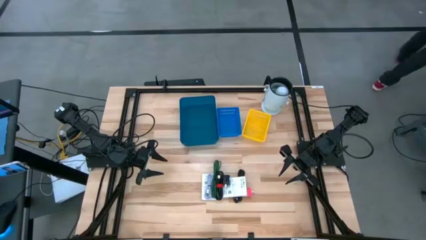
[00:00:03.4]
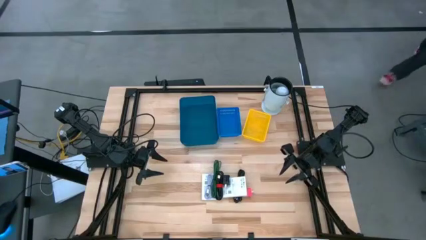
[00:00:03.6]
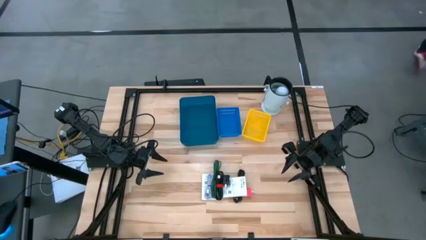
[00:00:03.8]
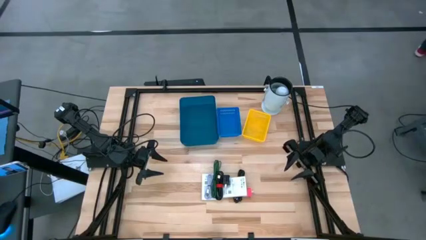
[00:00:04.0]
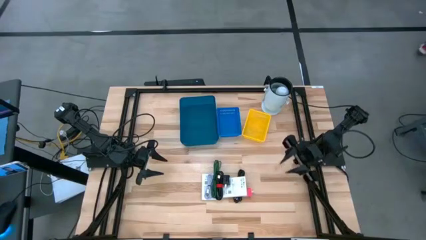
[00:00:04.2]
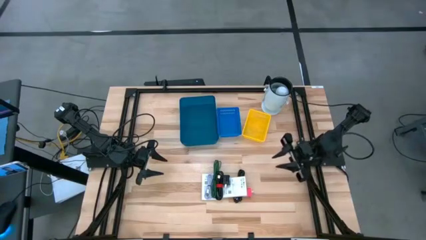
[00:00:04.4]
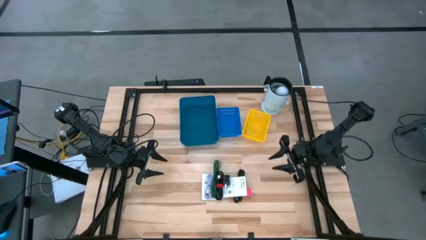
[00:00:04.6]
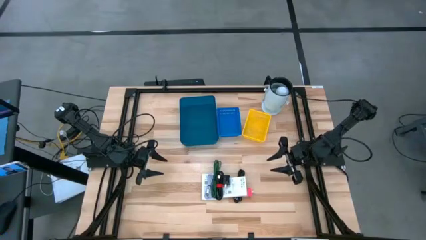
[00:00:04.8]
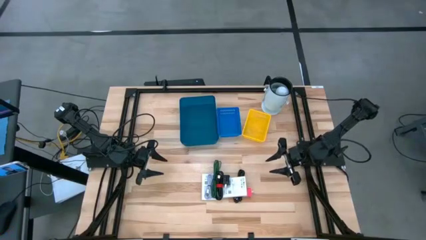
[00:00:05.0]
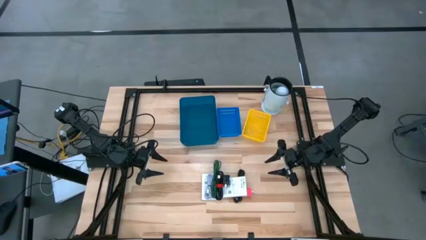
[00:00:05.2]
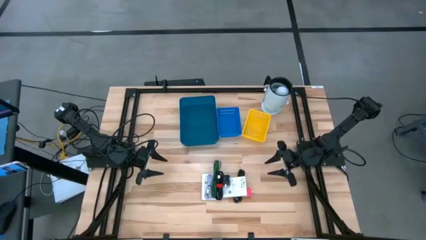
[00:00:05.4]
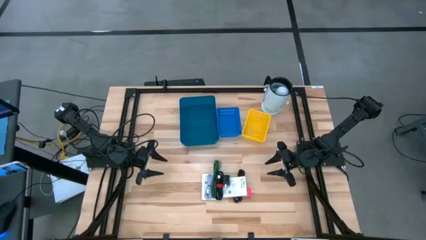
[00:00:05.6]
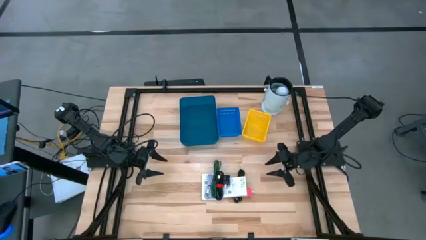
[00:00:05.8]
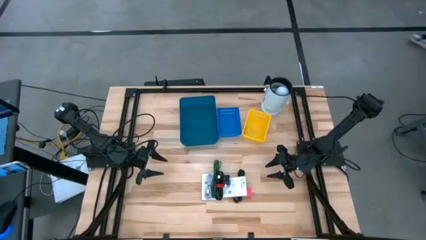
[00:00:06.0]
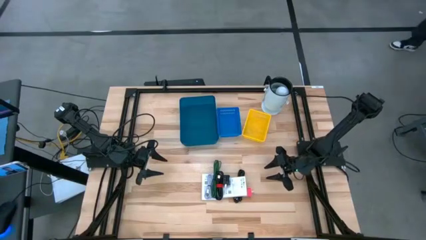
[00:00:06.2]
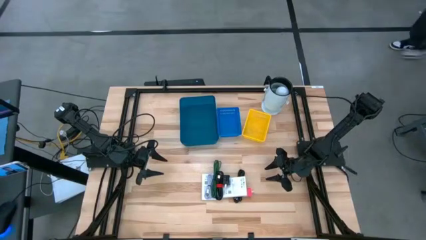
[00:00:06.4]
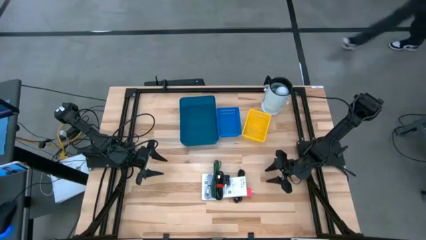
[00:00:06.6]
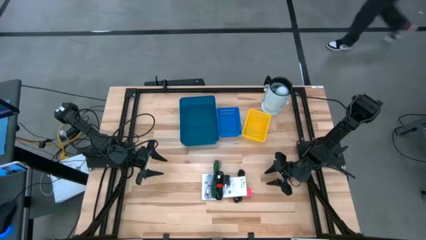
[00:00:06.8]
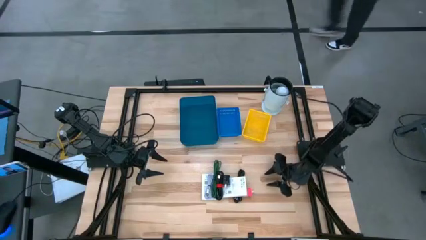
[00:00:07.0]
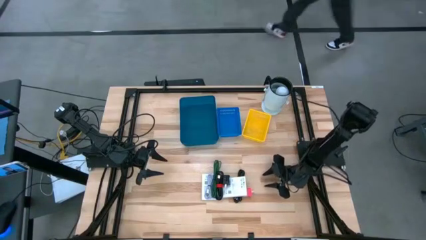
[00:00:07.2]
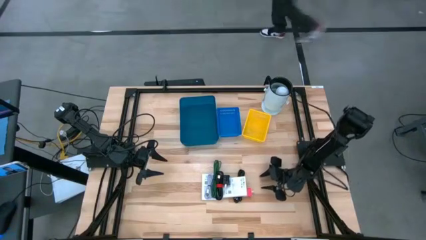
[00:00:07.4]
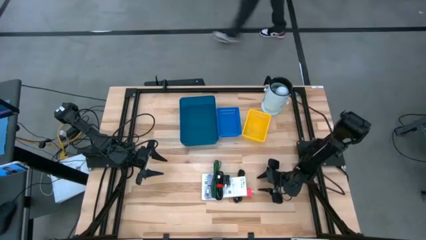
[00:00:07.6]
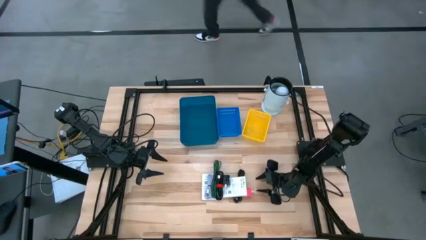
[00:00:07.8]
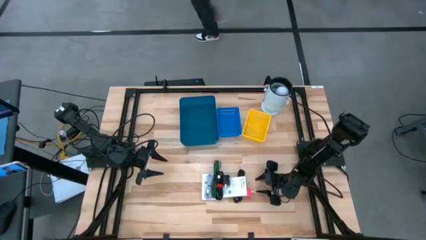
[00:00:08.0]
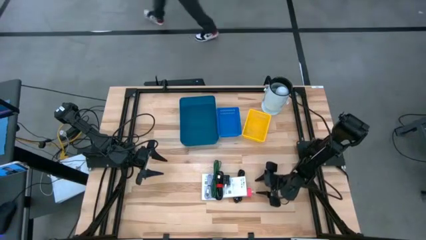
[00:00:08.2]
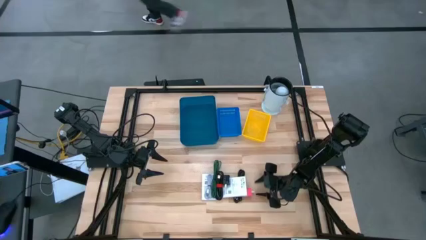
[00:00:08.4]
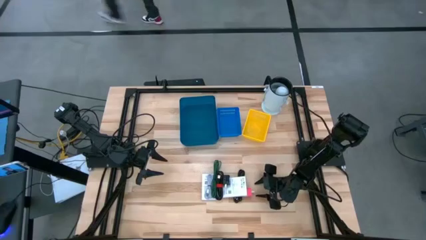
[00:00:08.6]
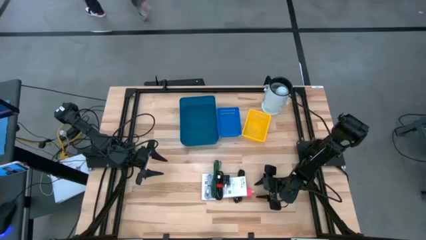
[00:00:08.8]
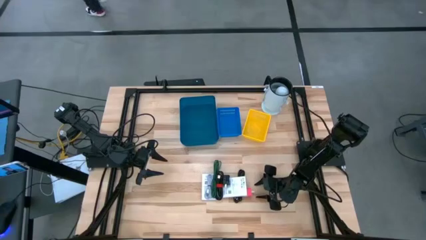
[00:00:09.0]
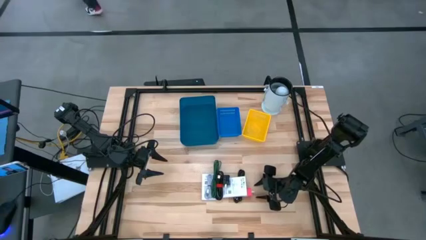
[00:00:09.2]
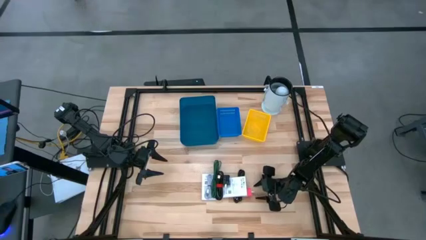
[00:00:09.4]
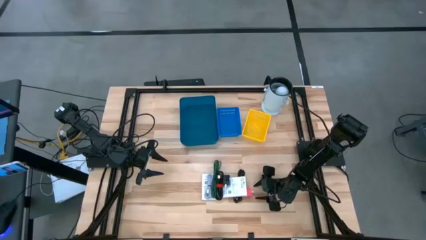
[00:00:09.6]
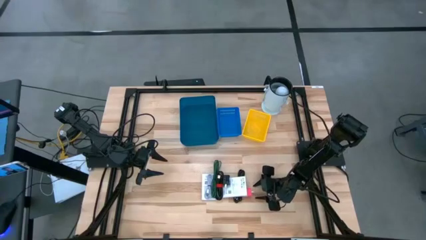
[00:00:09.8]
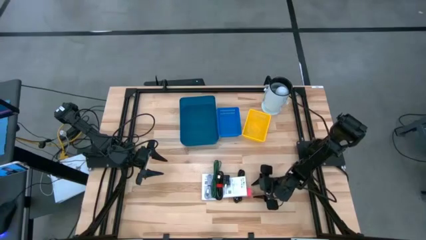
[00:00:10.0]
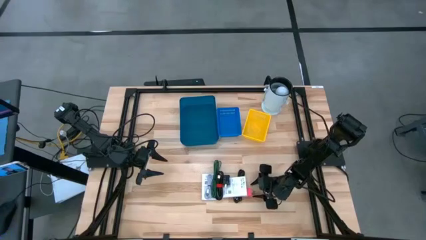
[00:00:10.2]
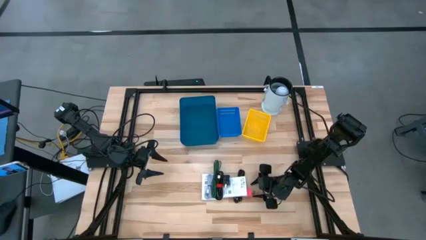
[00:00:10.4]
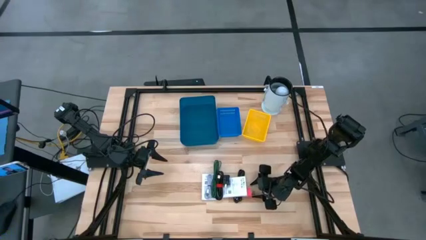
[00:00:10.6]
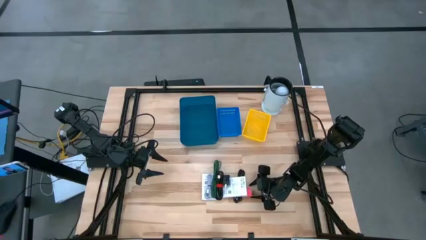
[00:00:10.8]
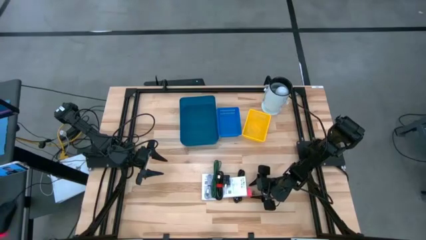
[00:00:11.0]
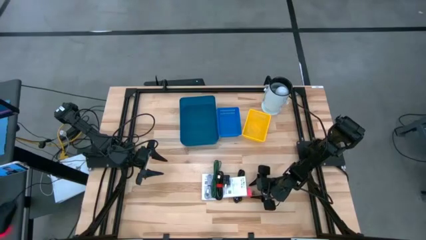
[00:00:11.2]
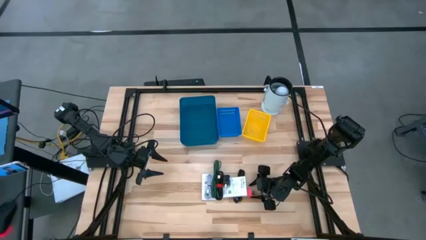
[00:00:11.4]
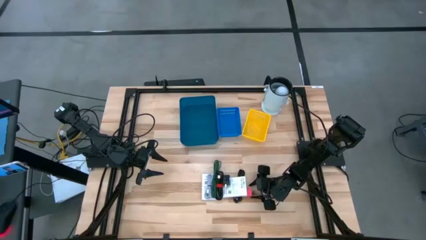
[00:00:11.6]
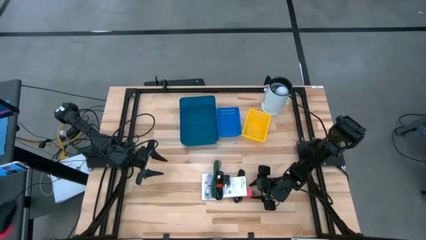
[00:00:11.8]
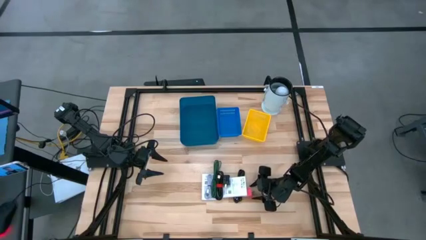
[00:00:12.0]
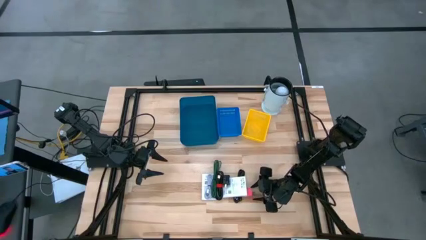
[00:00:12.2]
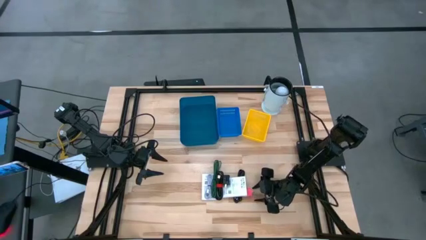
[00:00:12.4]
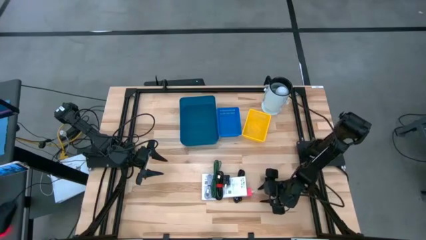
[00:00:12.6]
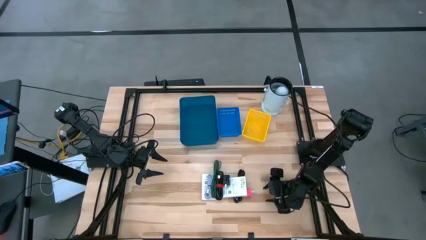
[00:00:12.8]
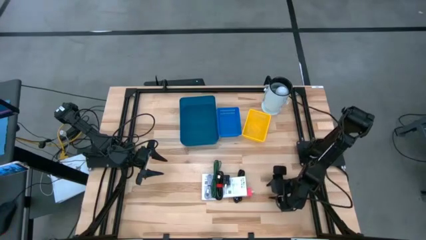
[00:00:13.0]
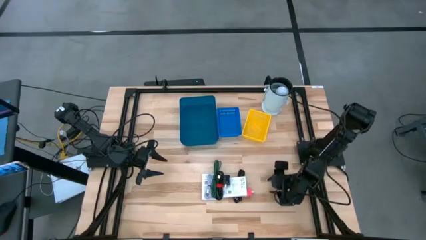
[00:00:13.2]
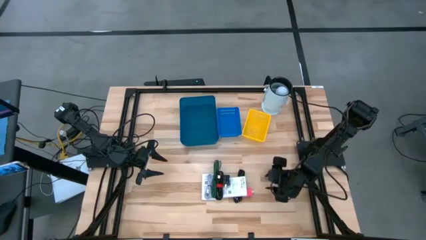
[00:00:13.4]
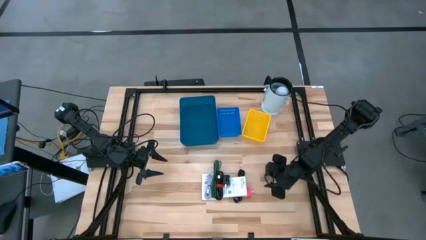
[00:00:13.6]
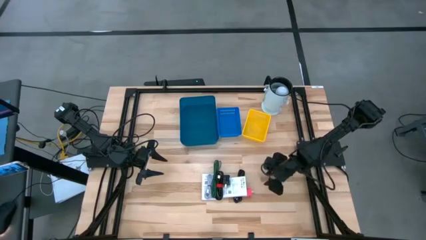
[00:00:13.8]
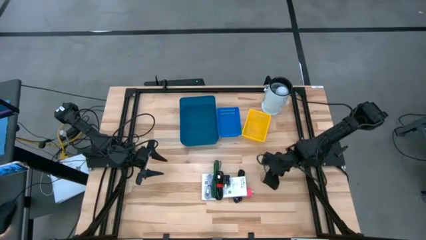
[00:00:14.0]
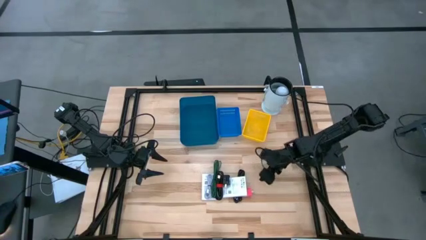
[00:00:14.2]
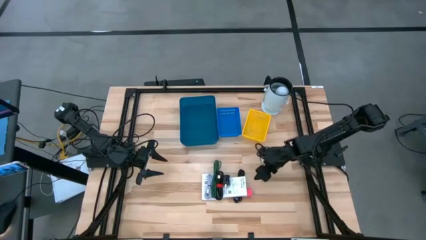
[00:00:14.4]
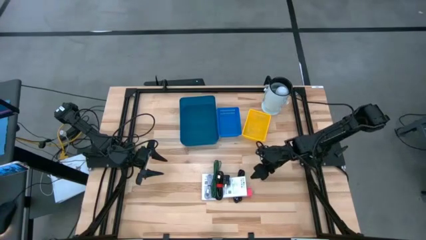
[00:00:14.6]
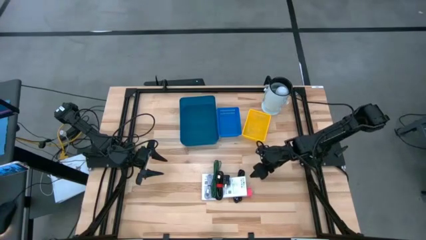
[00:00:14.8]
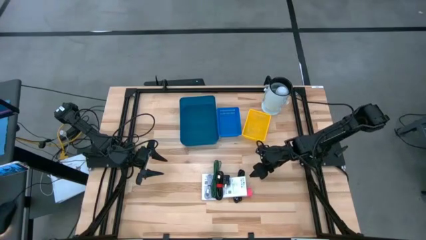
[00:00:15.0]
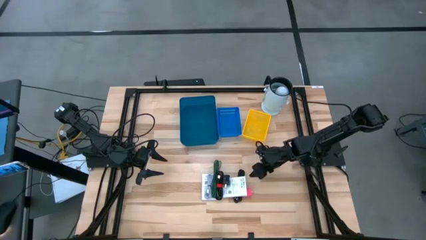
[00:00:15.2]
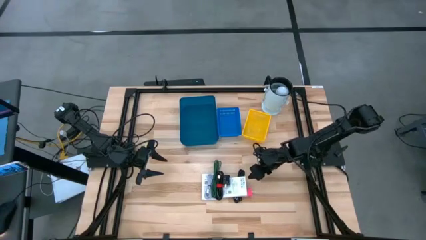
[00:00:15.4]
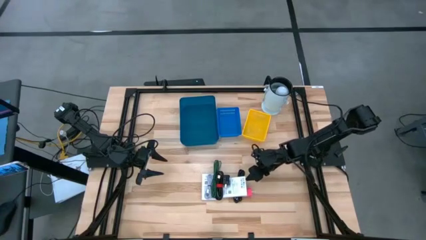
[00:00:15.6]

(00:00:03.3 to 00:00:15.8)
Task: Pick and place items into bin
Put the right white card reader box into the blue bin
